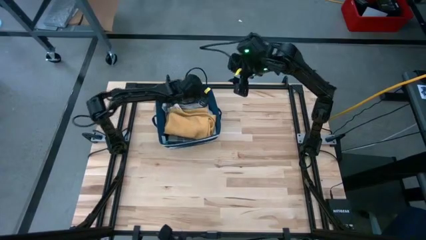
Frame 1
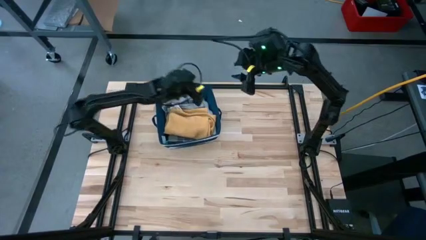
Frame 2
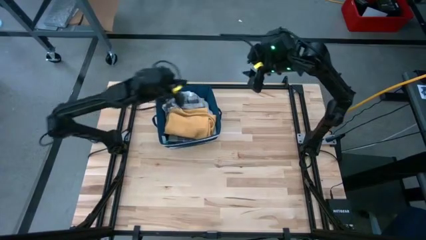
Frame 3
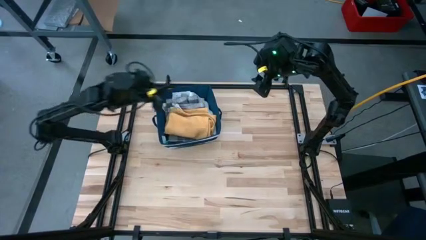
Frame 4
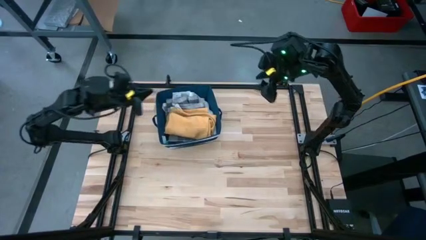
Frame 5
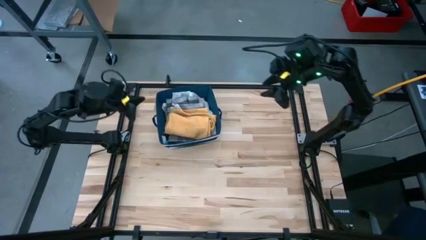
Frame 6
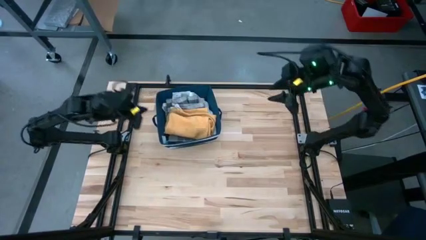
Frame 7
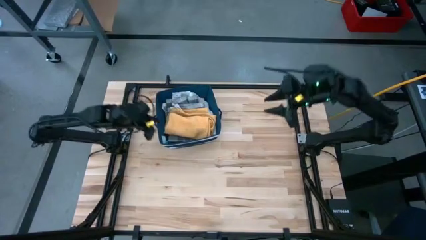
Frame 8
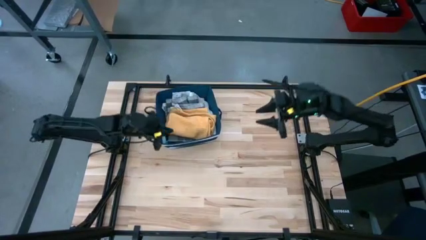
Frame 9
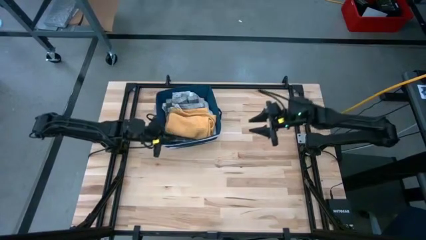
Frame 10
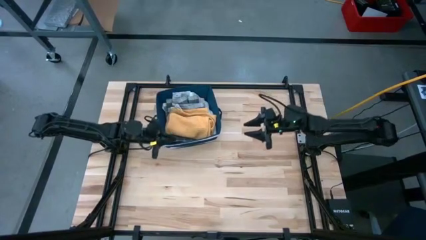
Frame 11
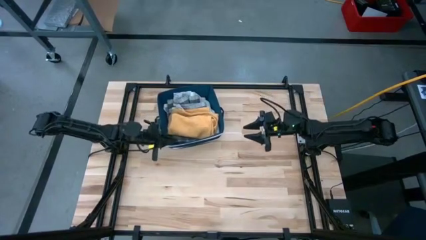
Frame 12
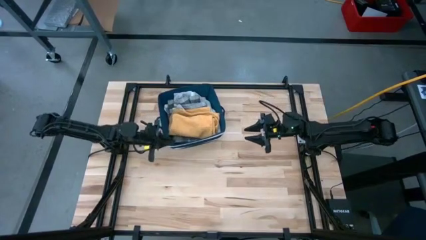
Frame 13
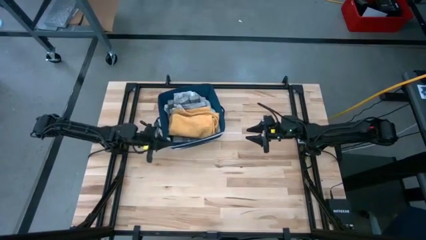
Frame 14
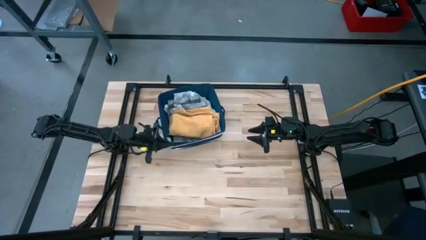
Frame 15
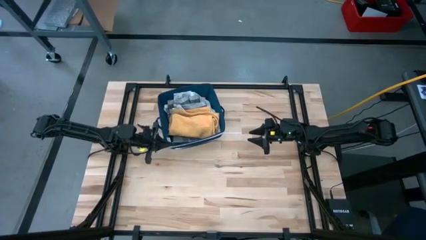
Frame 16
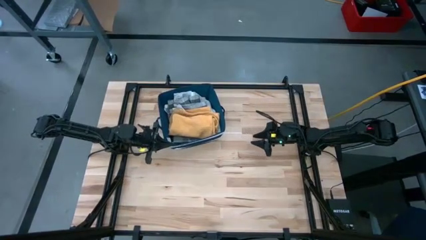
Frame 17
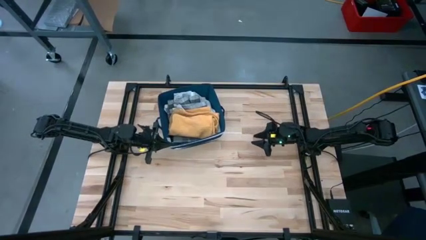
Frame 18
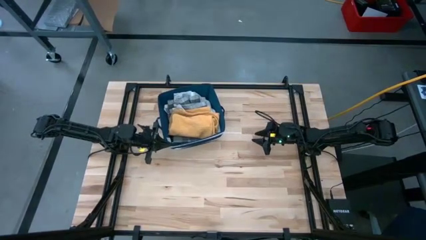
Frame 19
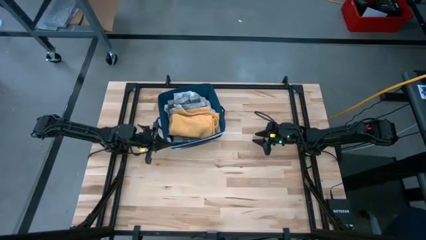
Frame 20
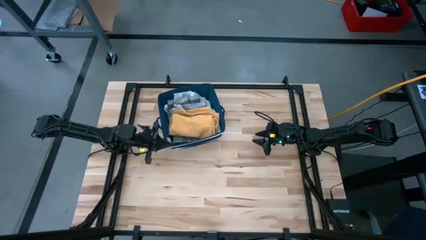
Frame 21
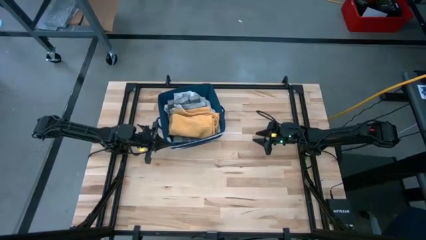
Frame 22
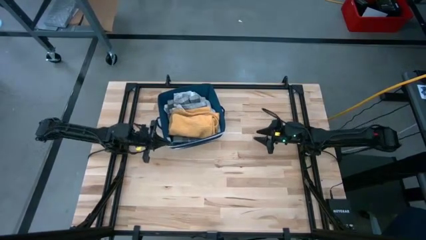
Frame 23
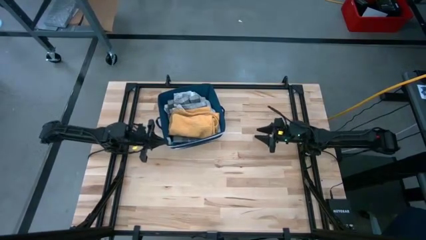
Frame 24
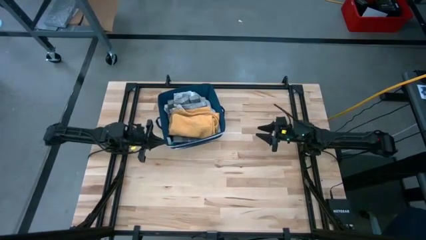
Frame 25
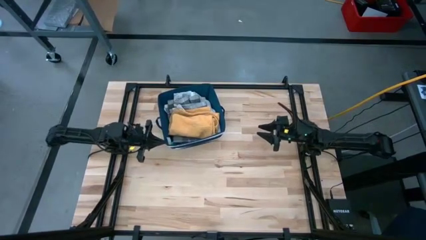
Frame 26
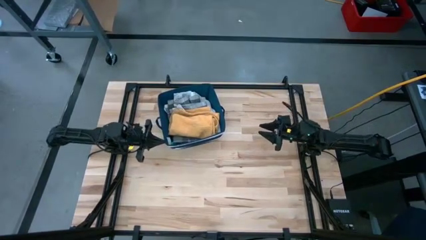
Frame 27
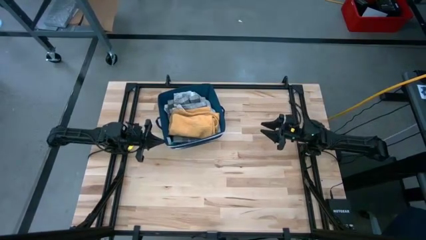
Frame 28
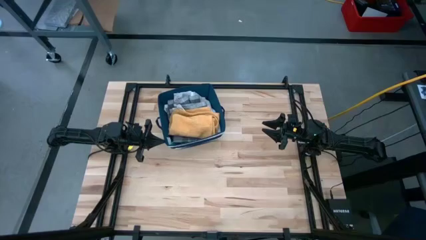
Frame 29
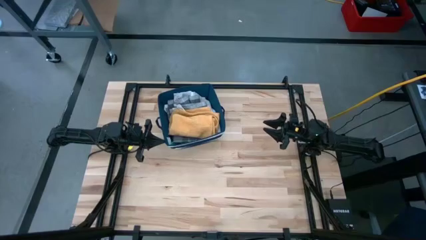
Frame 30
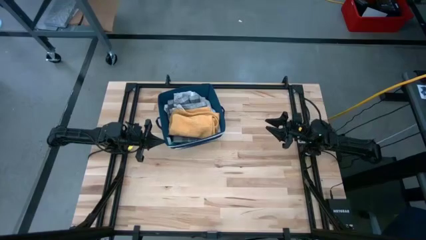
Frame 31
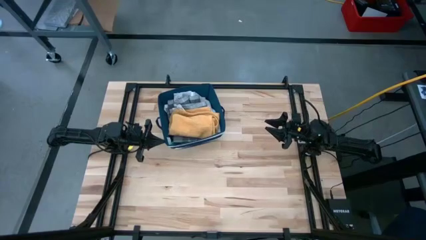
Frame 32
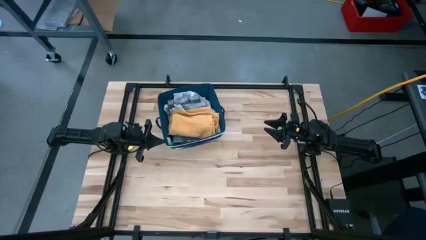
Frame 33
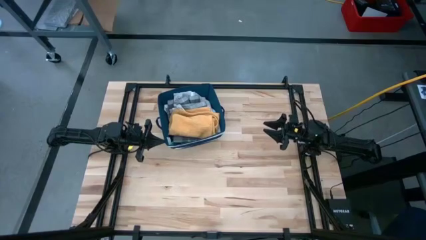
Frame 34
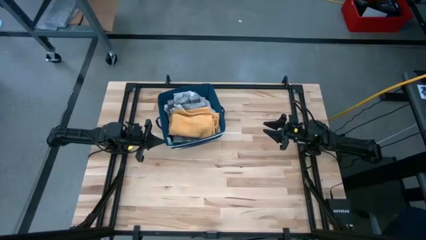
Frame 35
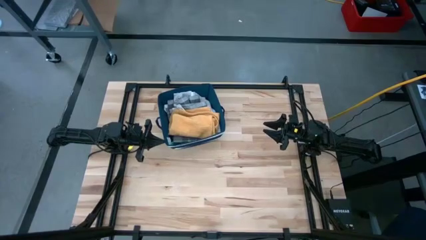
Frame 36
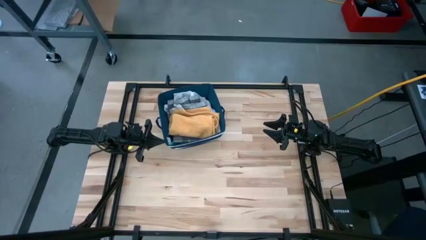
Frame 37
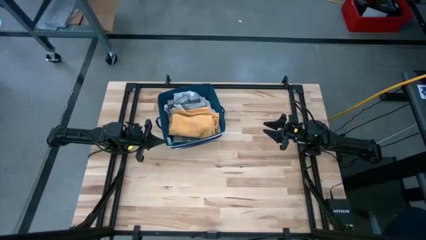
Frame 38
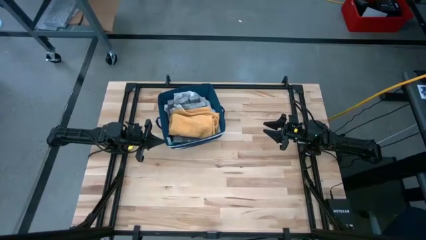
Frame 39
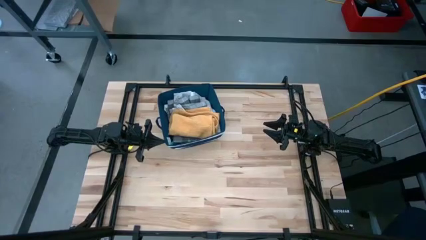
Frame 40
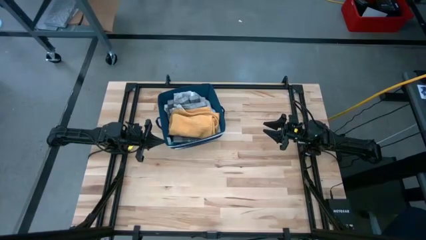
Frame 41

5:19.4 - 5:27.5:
Task: Fold towel
Return to Home Position

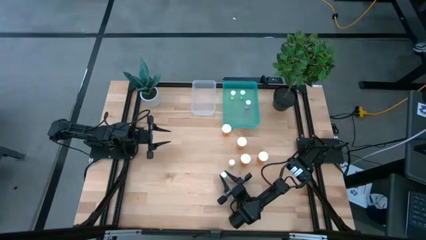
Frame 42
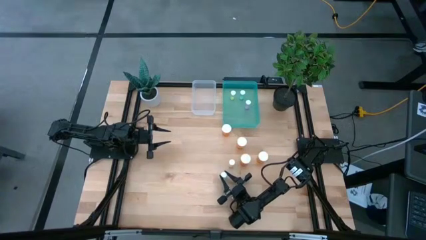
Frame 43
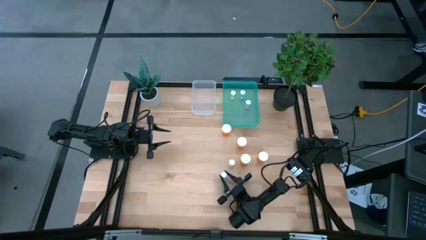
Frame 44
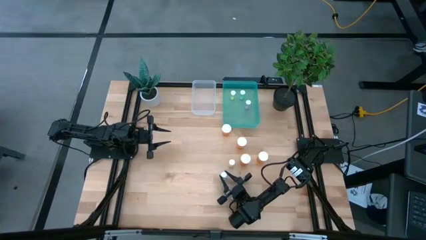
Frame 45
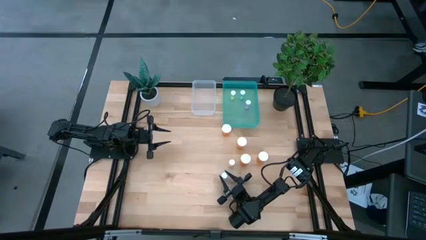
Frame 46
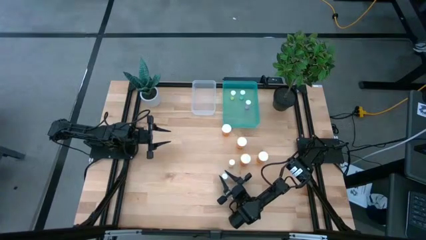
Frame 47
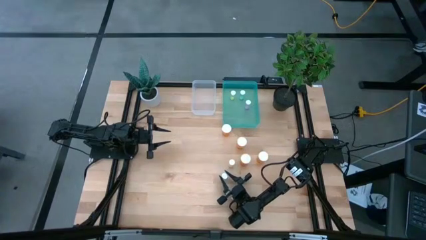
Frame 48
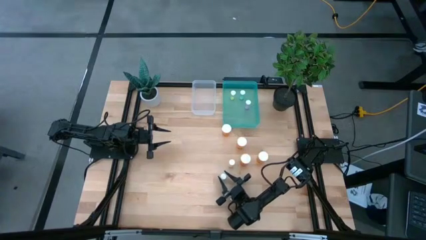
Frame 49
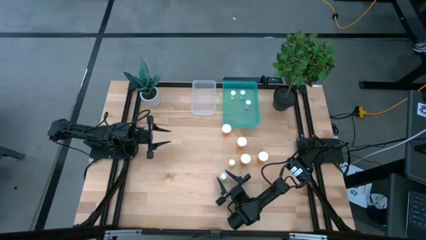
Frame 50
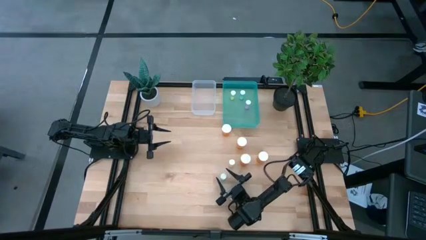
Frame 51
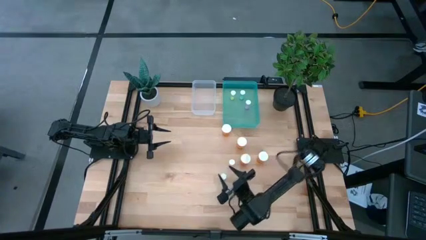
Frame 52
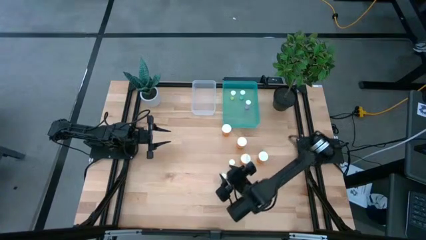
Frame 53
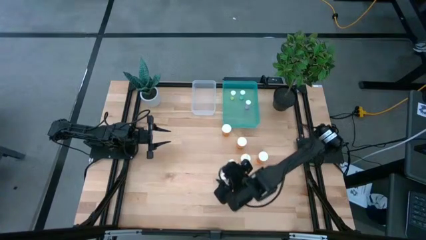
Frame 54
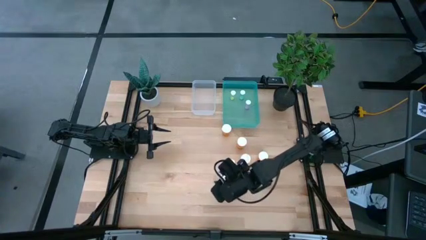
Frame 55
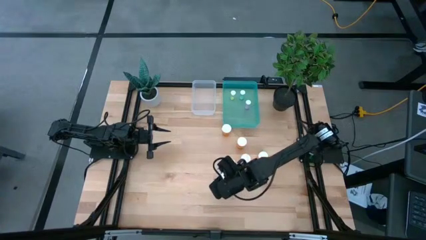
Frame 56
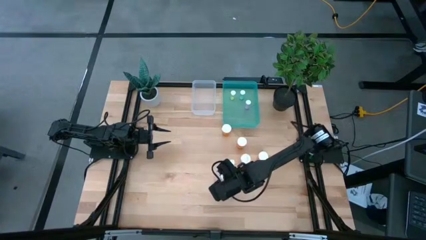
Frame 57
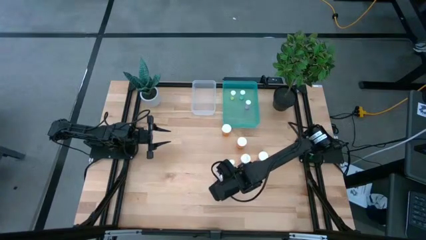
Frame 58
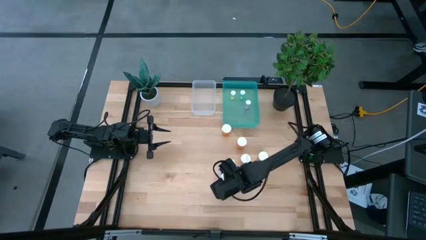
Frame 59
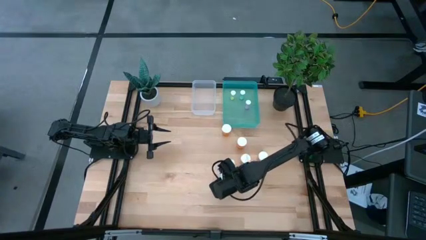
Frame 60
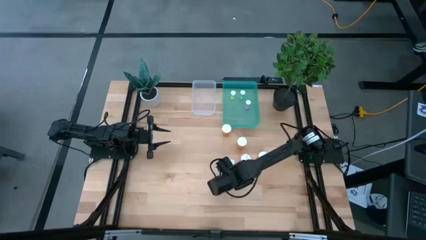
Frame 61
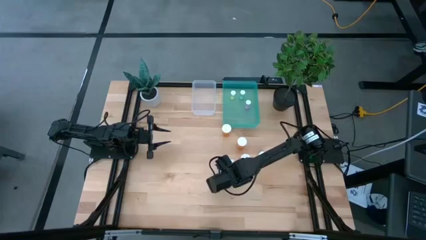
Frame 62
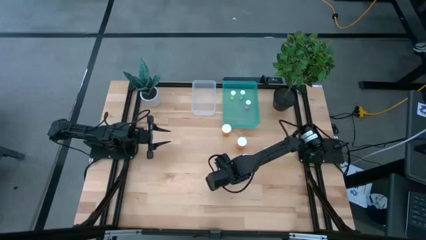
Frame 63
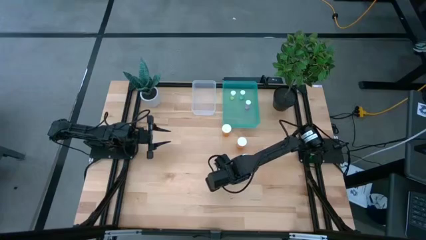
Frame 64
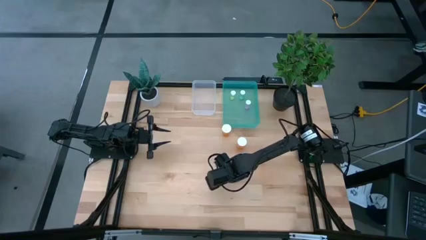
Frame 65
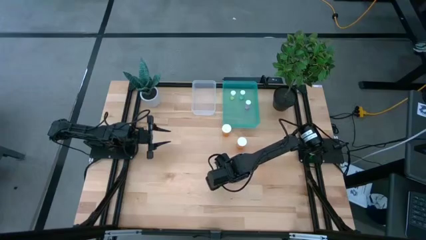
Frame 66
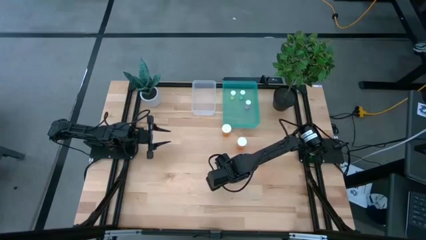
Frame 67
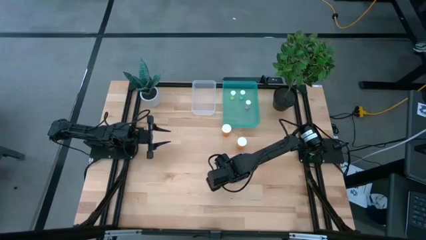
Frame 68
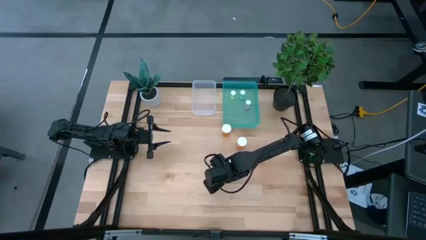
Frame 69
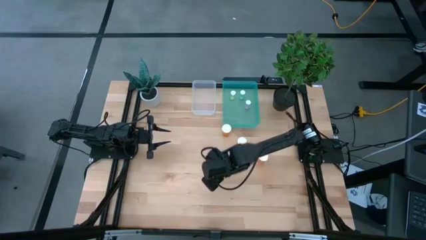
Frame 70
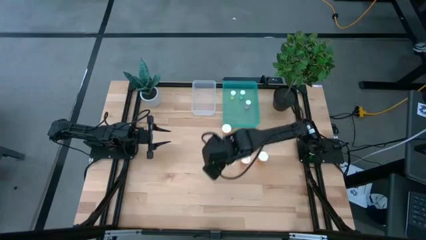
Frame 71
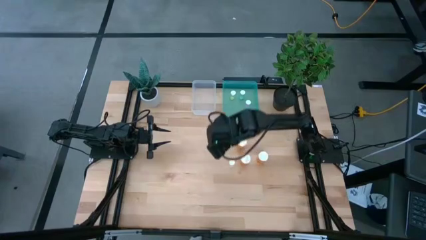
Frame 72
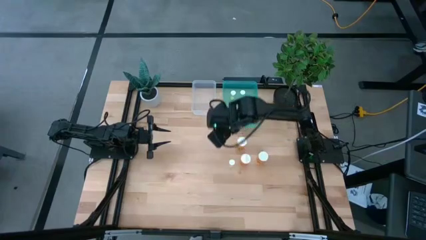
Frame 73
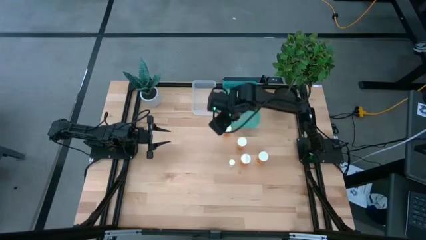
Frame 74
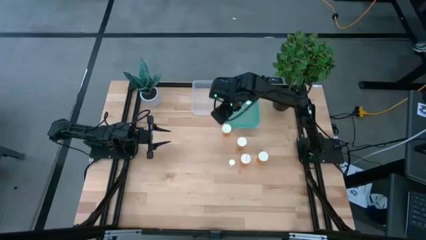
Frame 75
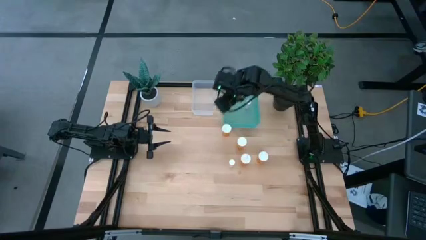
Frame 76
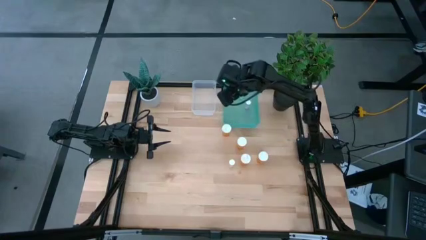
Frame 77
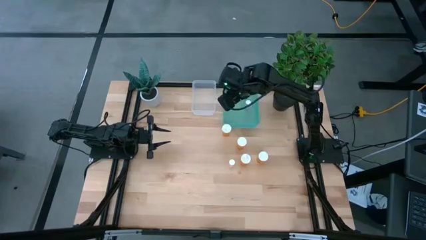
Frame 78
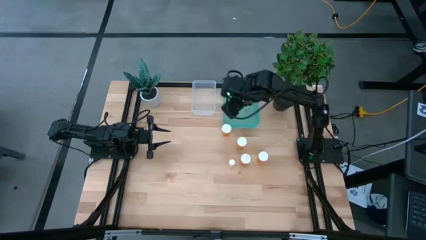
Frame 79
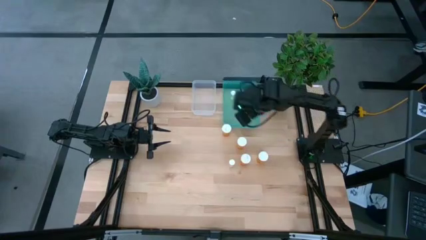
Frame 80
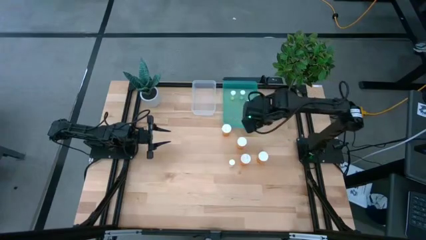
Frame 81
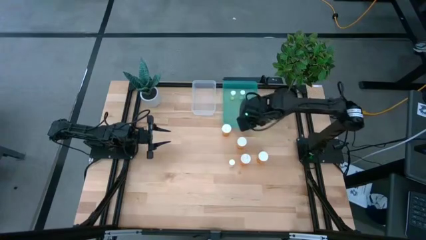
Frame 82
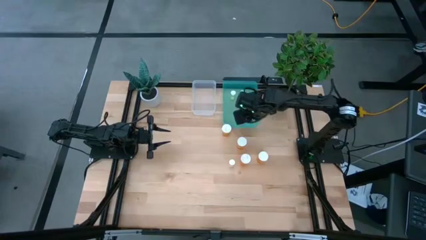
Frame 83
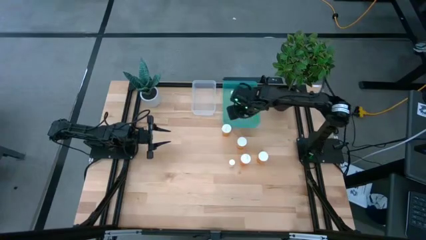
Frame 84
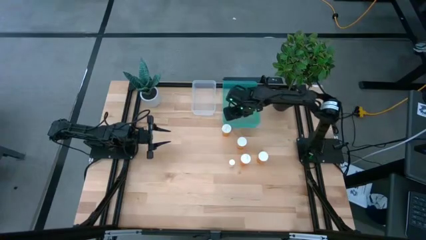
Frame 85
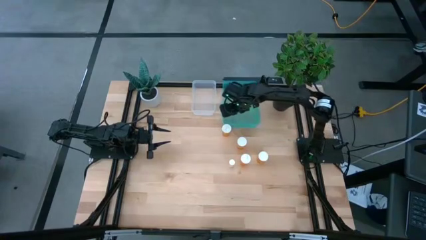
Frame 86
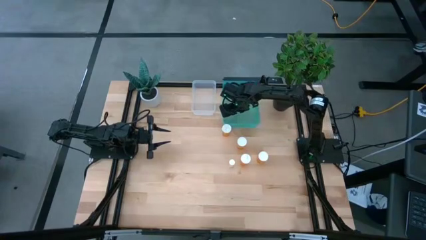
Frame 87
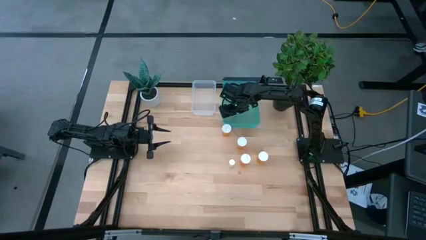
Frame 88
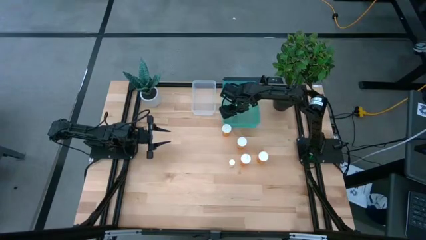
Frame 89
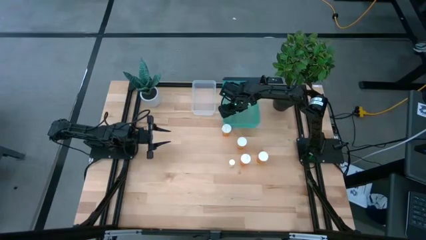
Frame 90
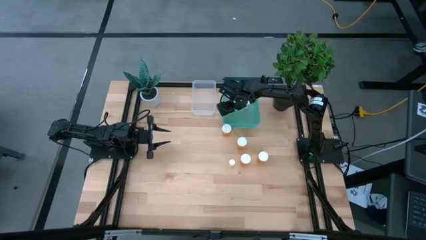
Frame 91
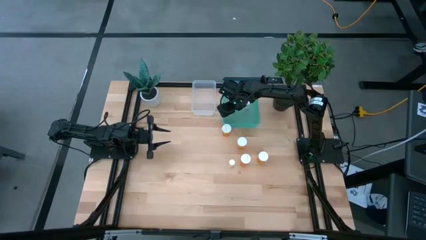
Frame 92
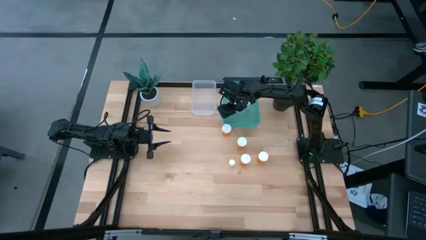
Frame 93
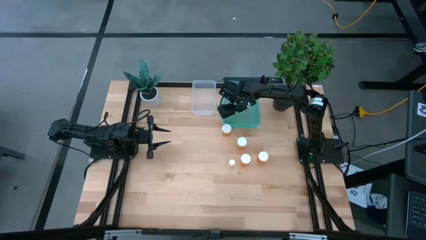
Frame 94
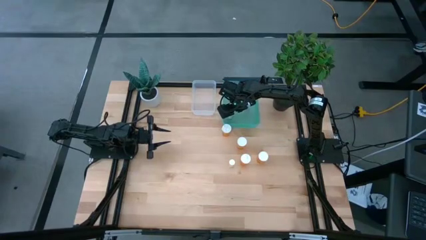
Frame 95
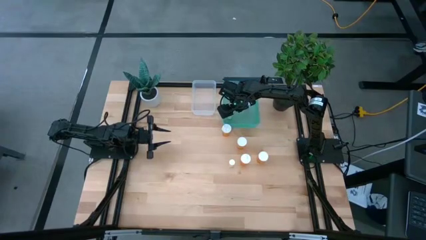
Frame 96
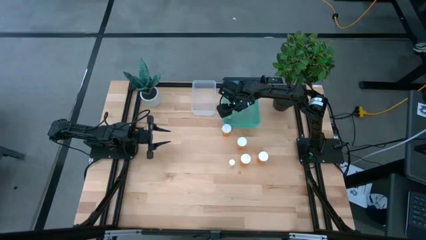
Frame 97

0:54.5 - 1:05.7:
Task: Pick and place medicine bottles into bin by pill shape (circle, oval)
Put the blue tablet bottle into the blue bin
